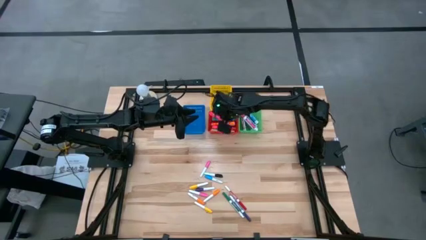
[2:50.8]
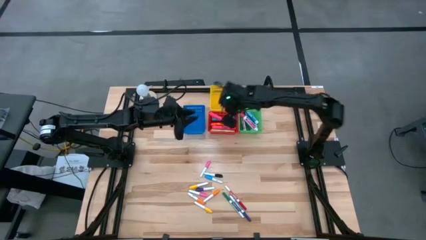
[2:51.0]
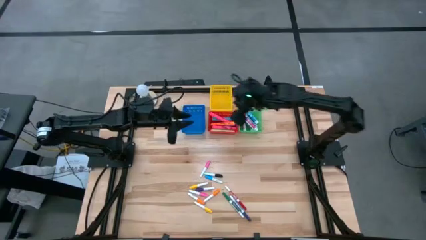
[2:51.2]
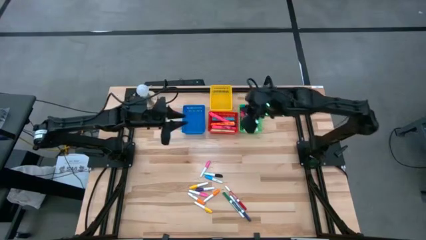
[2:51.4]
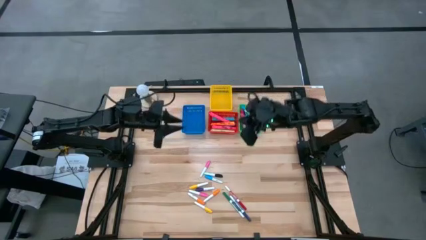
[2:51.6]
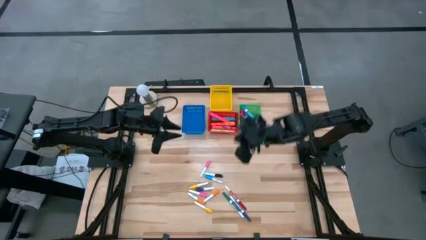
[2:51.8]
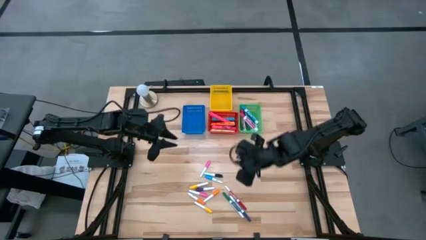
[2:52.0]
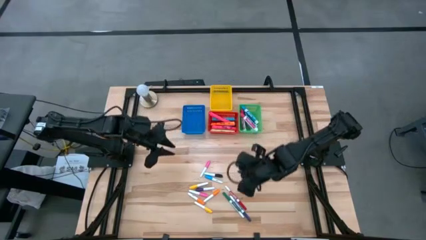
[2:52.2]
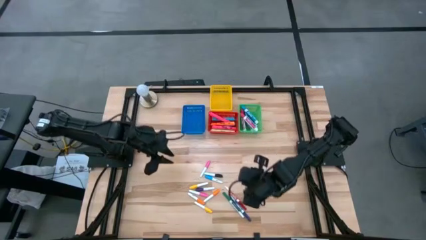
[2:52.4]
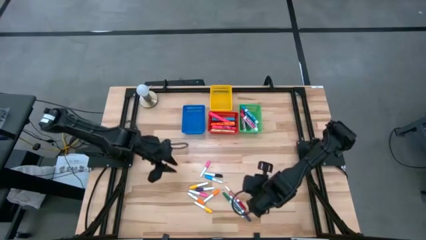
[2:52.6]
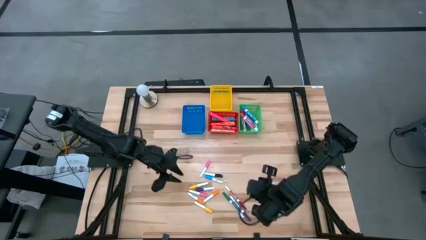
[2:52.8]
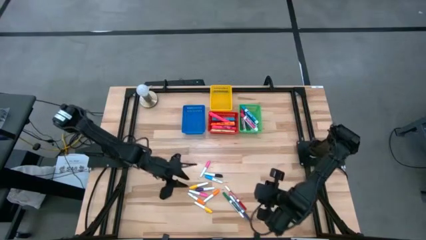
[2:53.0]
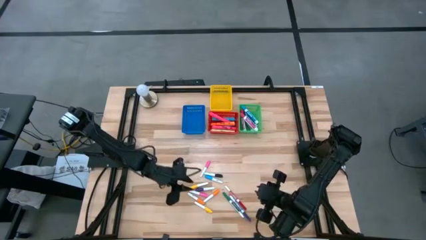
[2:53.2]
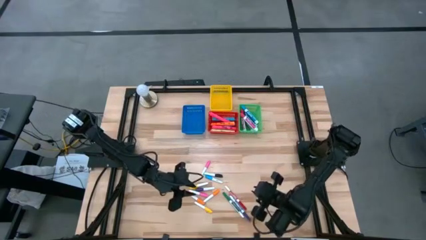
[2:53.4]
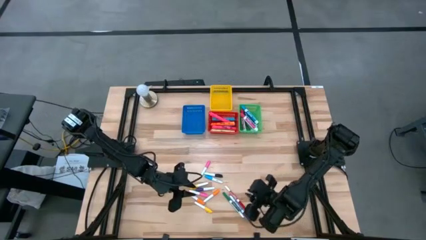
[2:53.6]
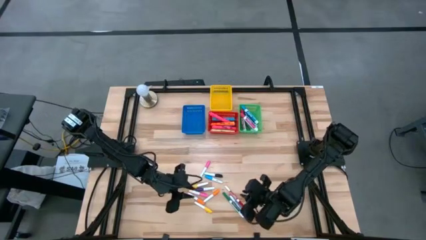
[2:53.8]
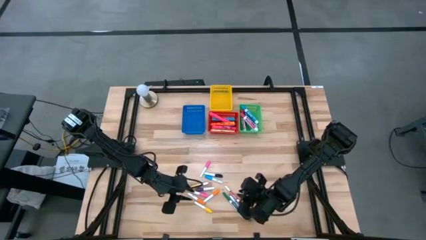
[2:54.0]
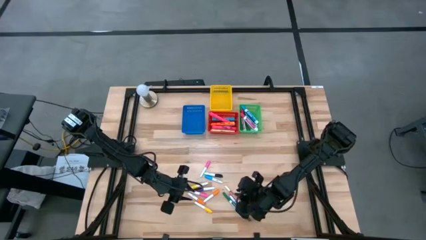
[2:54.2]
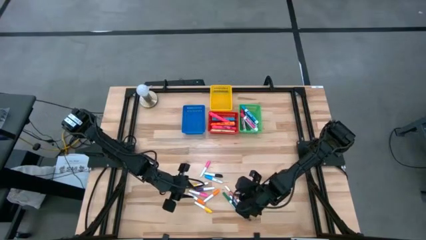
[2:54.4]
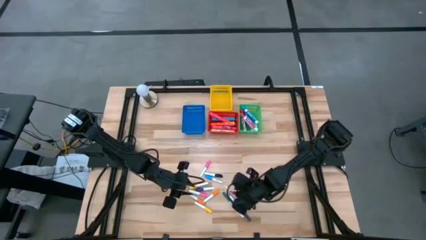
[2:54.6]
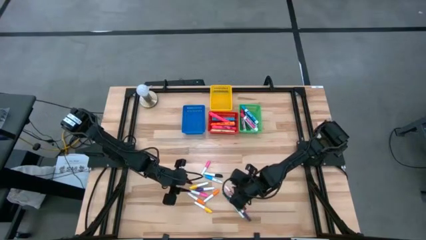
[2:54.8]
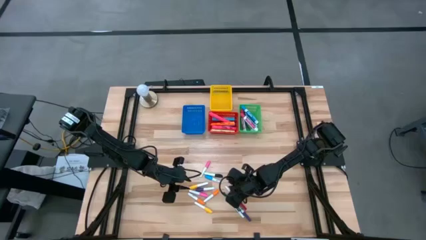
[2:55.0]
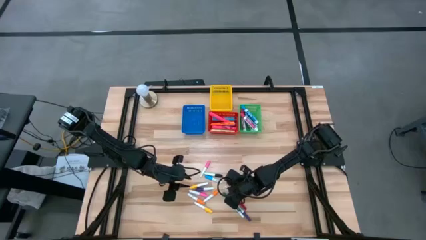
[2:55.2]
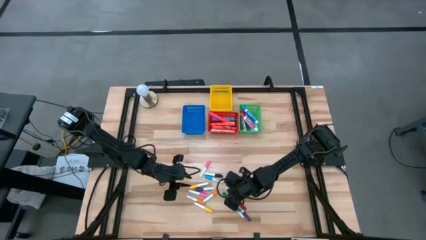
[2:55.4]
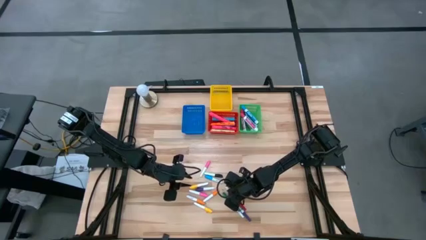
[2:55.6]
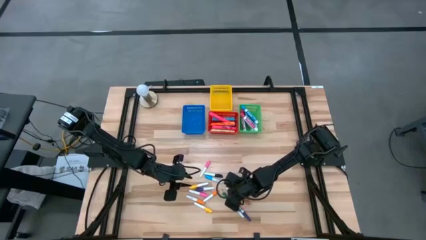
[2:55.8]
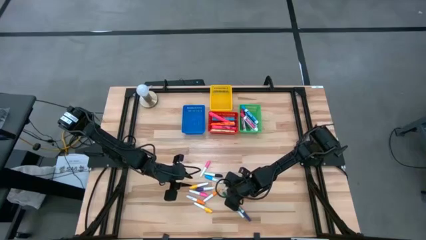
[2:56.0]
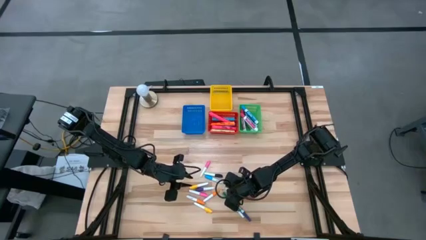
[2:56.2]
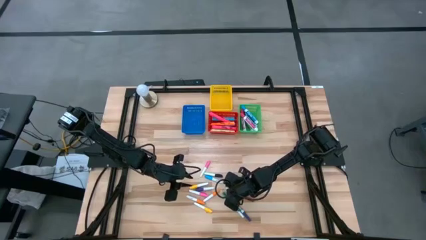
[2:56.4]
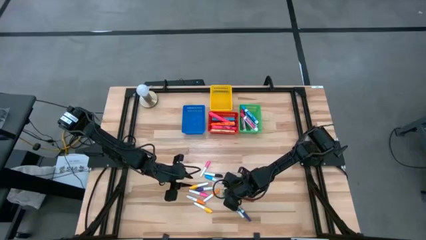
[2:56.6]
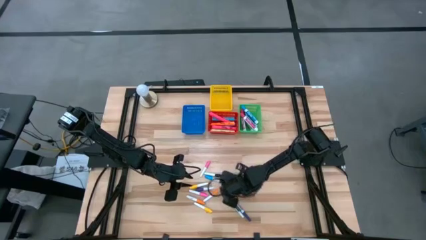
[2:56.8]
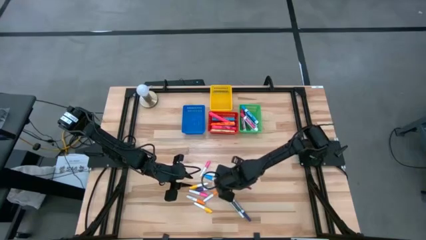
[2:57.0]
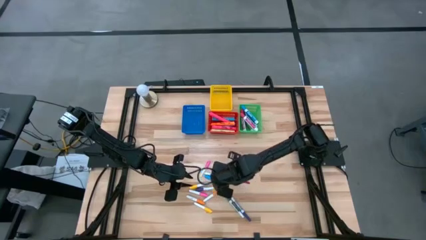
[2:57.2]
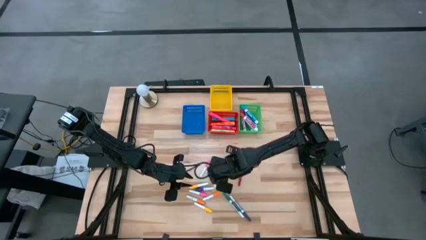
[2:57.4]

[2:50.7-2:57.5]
Task: Pick & Place Markers
Put the small red marker pen into the yellow bin

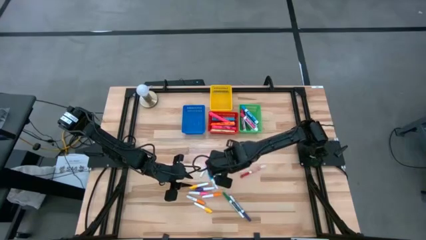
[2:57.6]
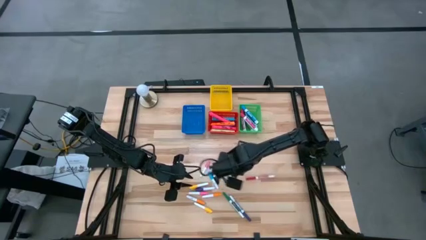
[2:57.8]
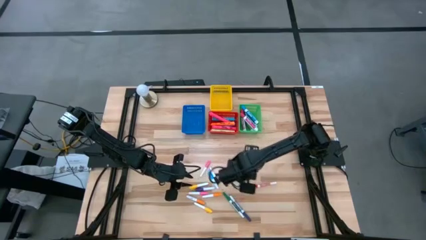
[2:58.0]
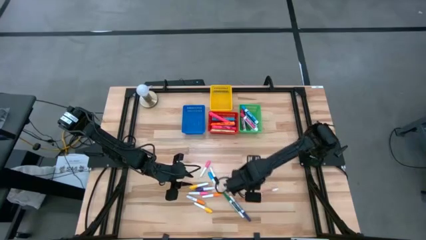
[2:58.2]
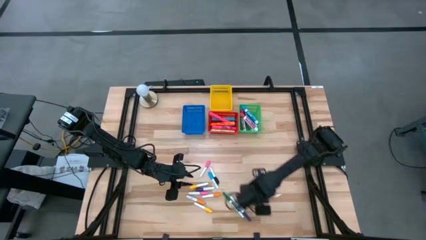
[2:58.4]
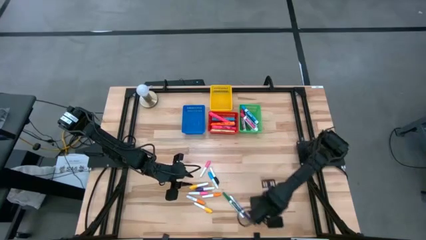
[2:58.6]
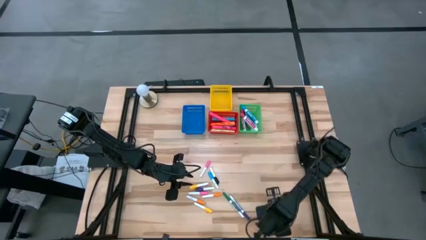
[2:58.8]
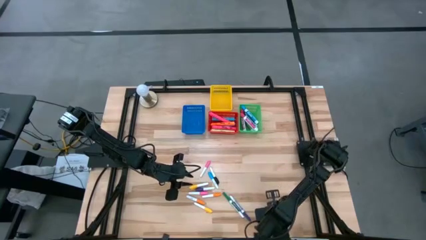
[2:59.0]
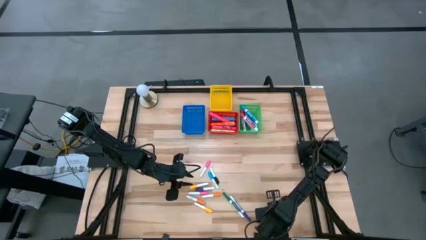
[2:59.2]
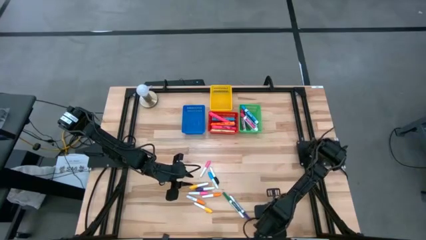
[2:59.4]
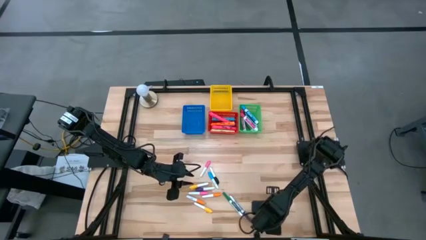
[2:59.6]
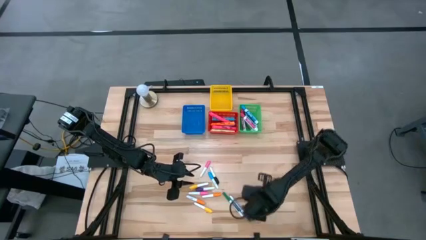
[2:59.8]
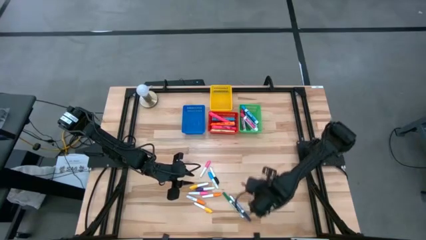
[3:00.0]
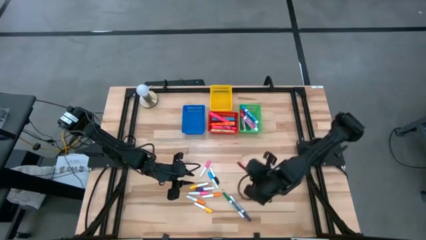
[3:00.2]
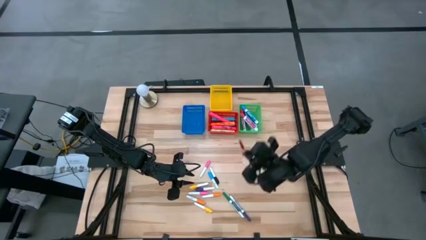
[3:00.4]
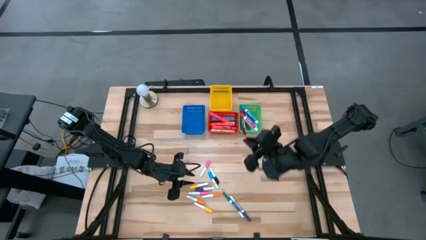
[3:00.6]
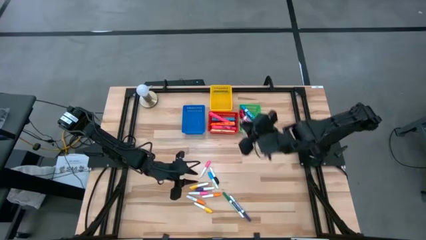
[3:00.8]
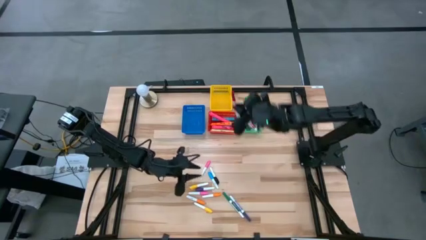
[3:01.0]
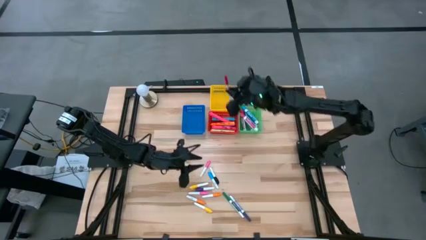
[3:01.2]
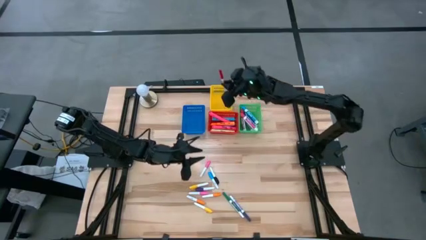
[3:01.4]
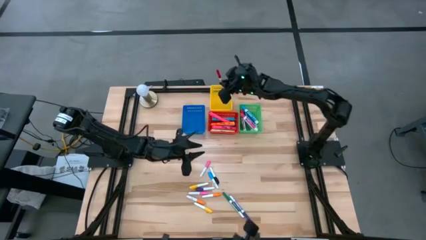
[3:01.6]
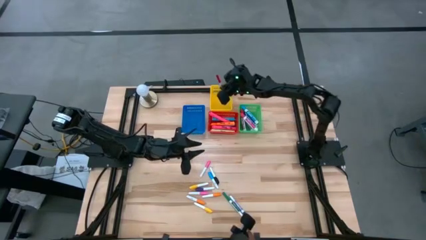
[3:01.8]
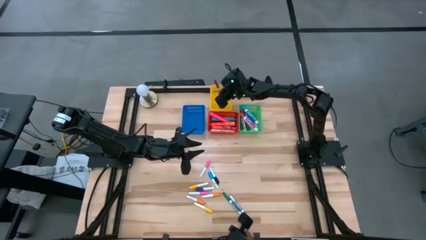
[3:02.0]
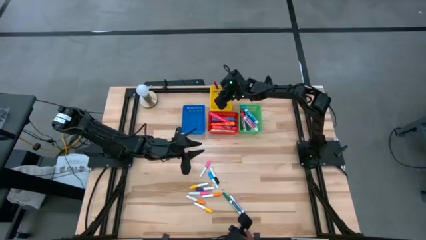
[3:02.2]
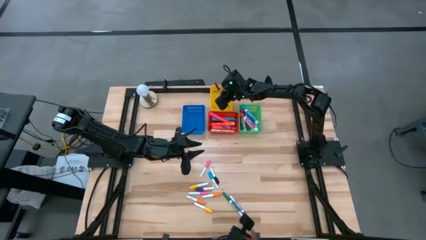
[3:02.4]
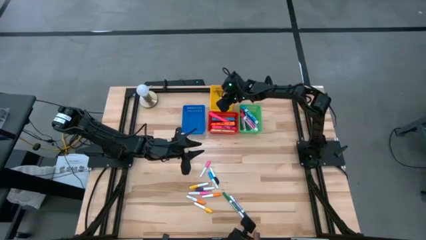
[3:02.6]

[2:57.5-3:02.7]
Put the small red marker pen into the yellow bin
